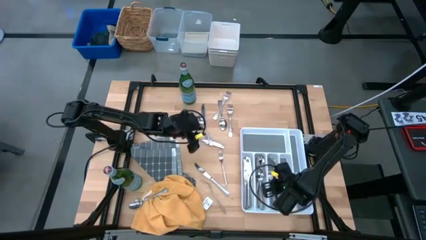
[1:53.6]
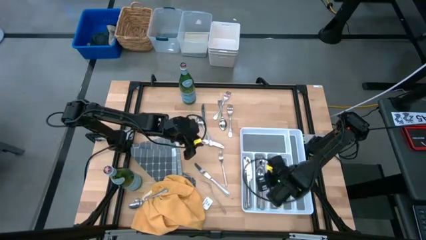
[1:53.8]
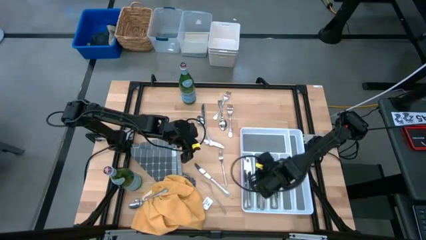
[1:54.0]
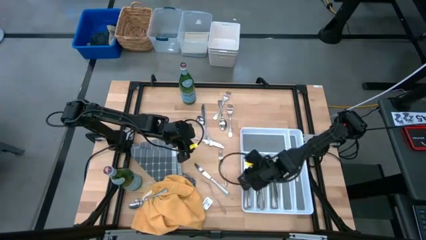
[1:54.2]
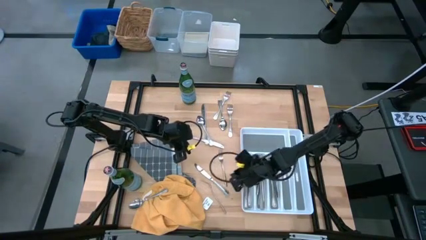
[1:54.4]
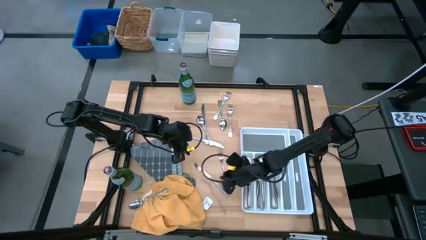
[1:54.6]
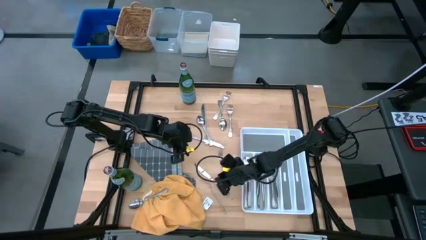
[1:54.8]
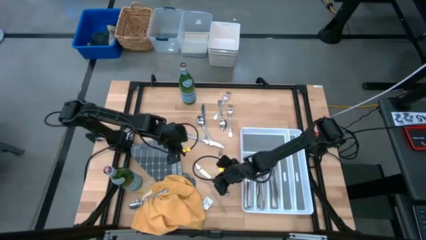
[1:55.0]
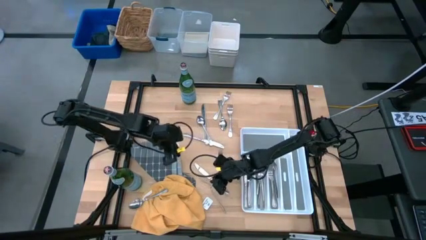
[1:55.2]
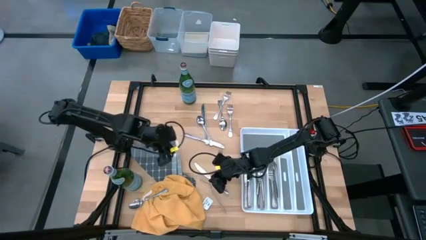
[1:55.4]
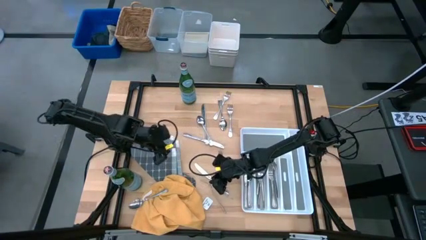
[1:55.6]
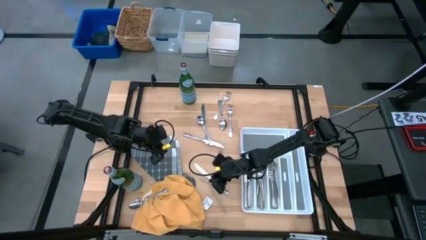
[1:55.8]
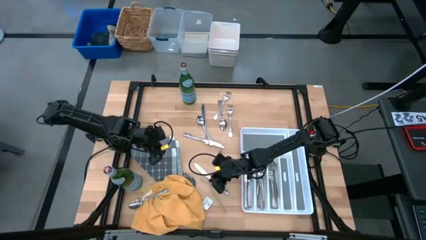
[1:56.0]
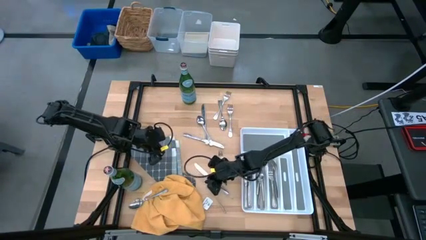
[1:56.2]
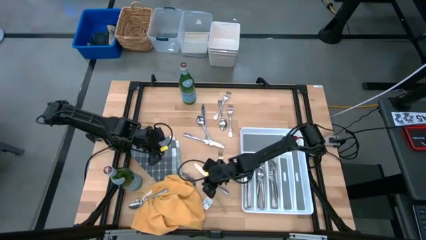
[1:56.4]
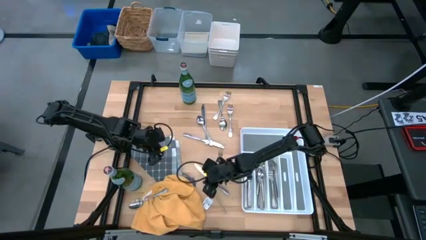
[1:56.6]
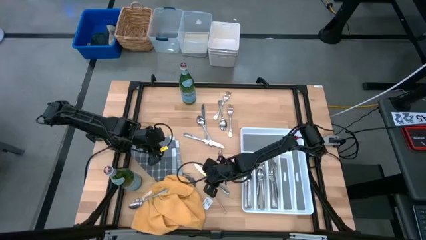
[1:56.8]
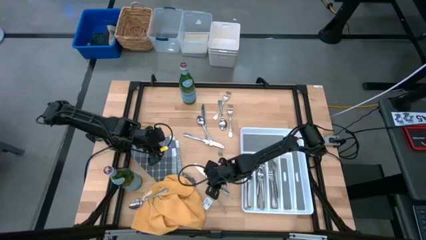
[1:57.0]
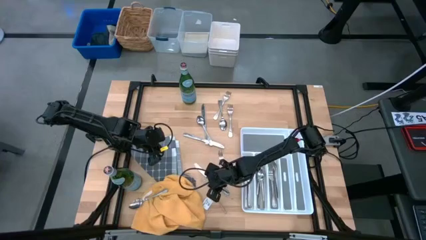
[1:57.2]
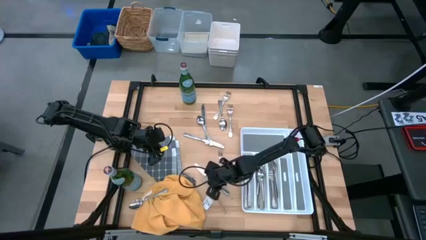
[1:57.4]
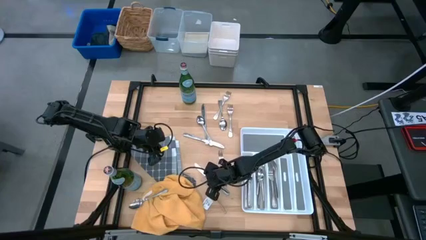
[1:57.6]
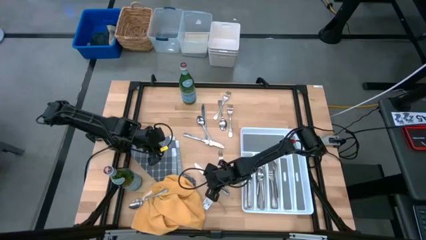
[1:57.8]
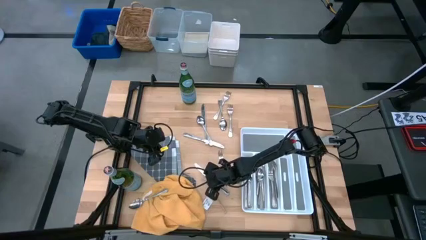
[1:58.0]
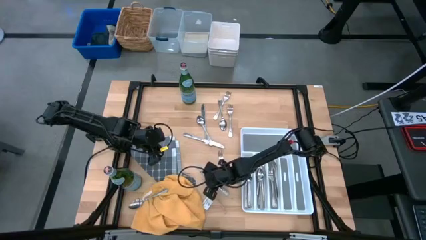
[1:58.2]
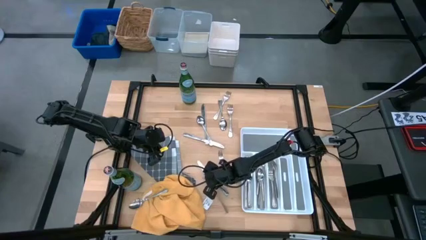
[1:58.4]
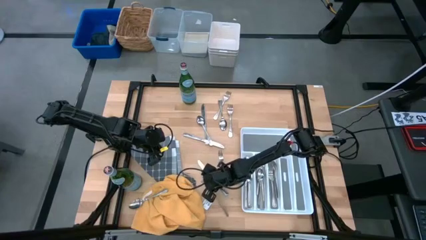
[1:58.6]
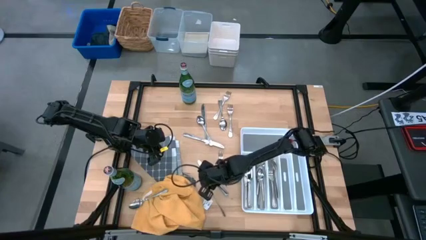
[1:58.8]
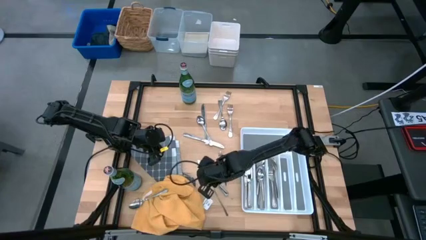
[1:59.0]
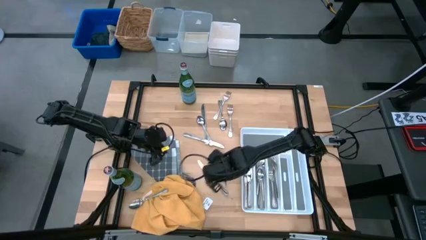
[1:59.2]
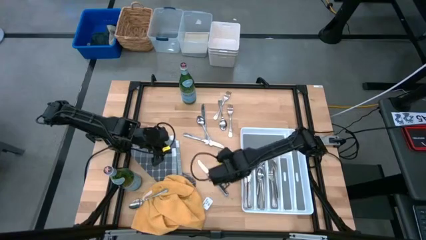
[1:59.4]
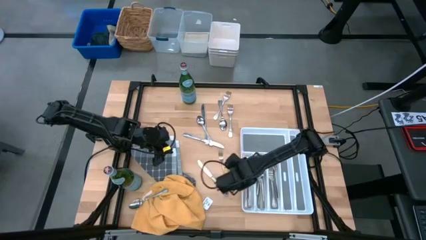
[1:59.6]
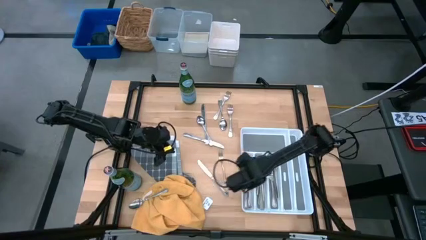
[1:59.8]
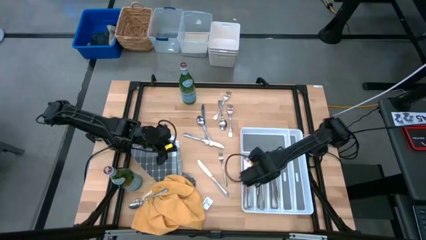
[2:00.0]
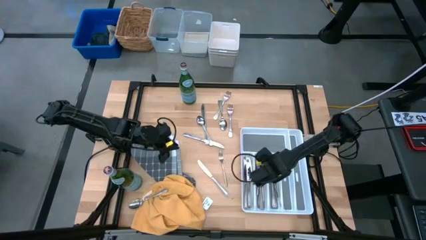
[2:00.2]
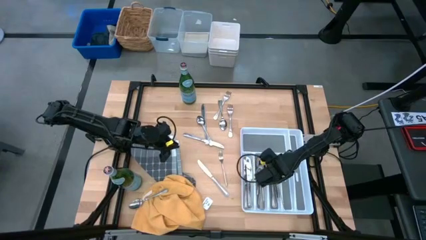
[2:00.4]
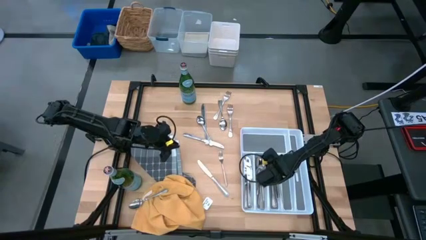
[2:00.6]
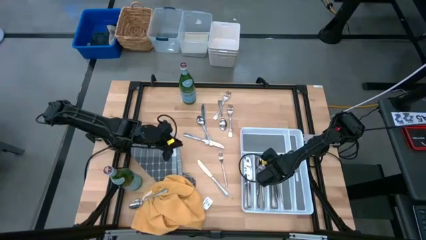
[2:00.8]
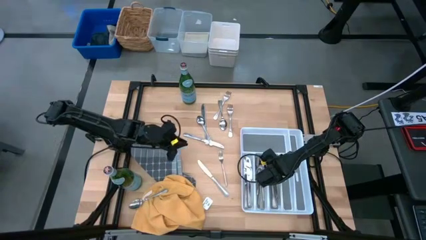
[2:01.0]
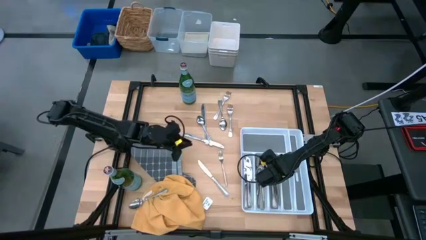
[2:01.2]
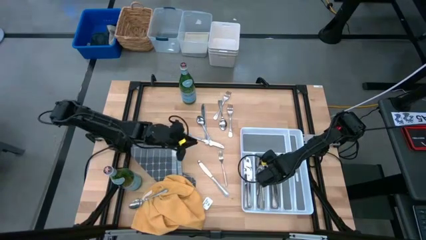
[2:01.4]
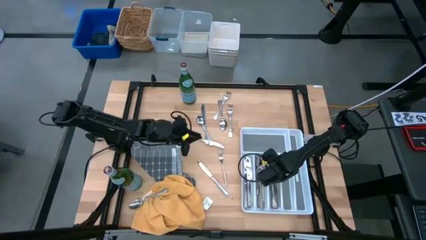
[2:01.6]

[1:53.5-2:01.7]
Stack the silver fork into the white utensil tray with the other silver forks
